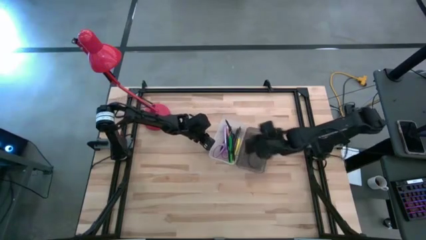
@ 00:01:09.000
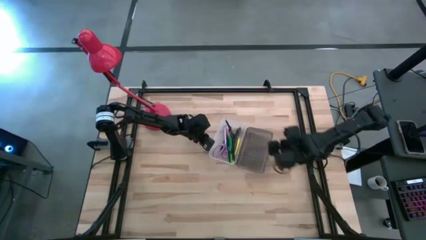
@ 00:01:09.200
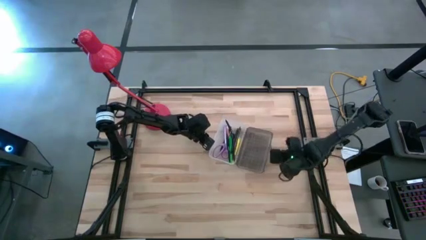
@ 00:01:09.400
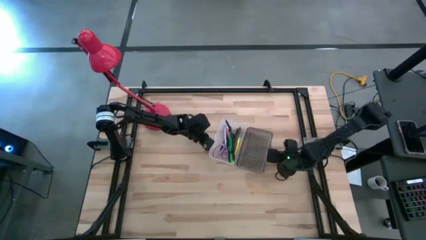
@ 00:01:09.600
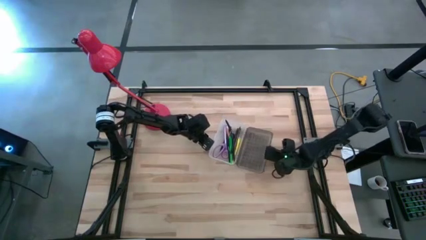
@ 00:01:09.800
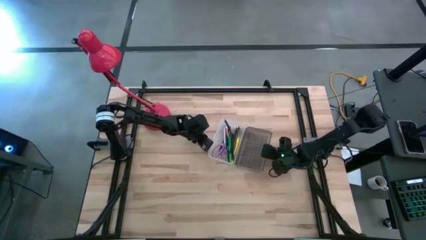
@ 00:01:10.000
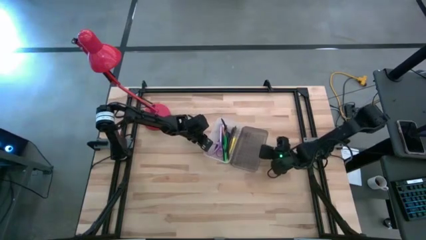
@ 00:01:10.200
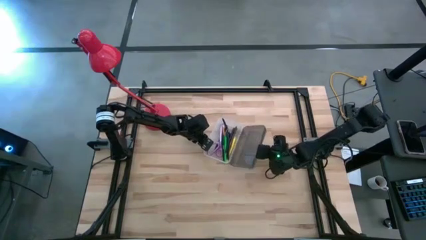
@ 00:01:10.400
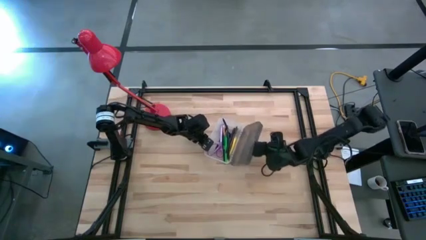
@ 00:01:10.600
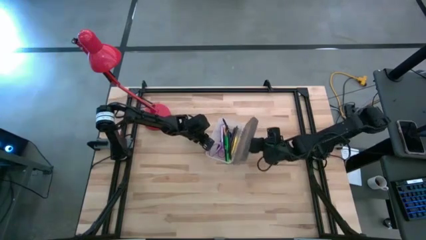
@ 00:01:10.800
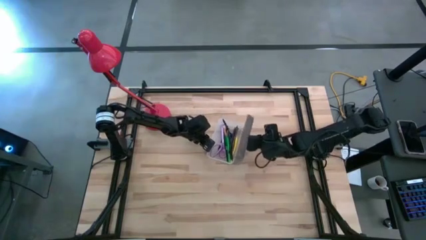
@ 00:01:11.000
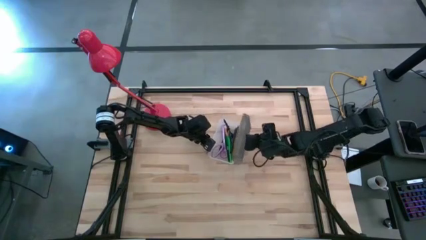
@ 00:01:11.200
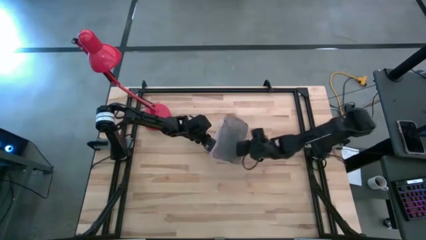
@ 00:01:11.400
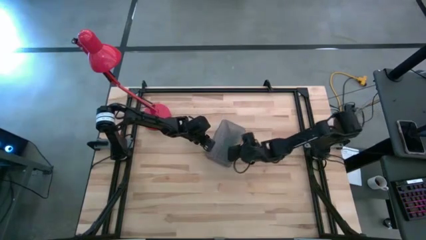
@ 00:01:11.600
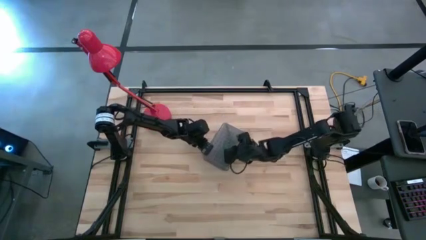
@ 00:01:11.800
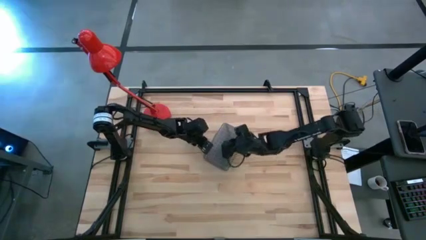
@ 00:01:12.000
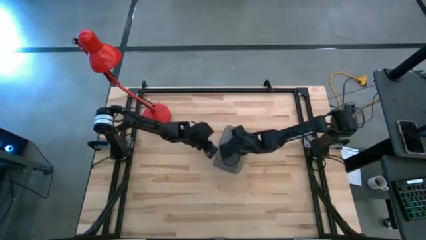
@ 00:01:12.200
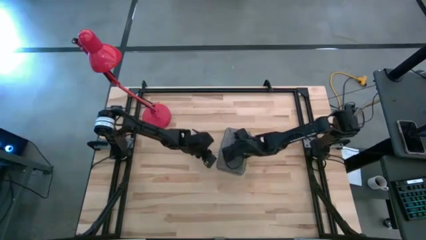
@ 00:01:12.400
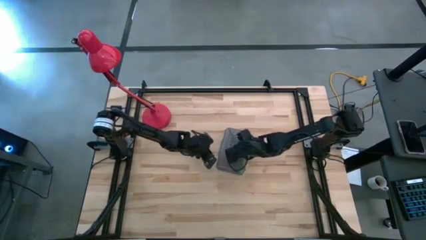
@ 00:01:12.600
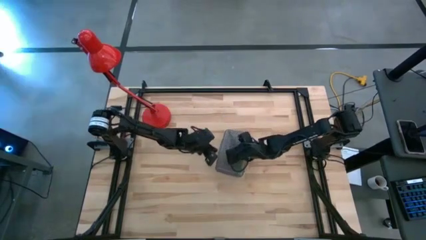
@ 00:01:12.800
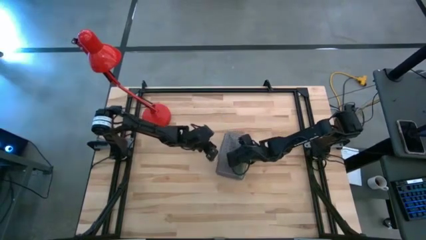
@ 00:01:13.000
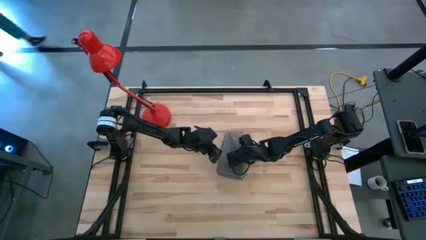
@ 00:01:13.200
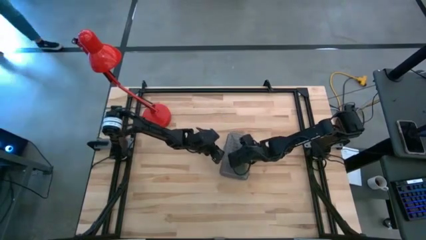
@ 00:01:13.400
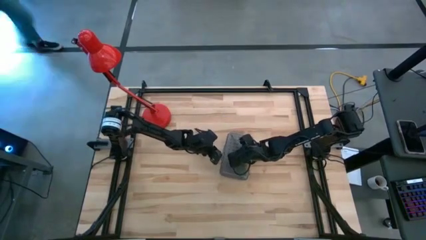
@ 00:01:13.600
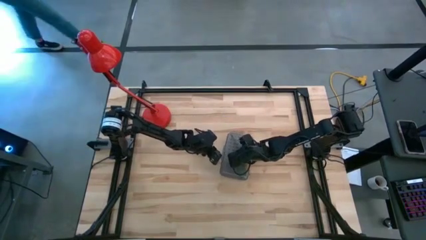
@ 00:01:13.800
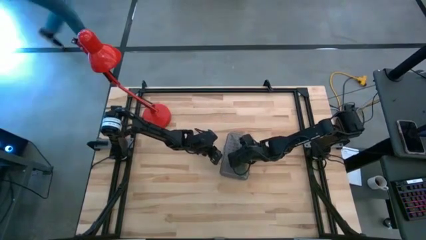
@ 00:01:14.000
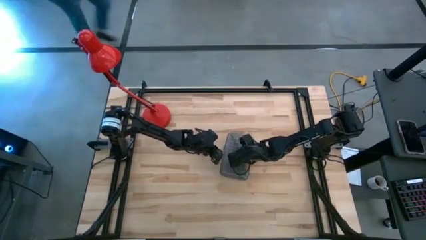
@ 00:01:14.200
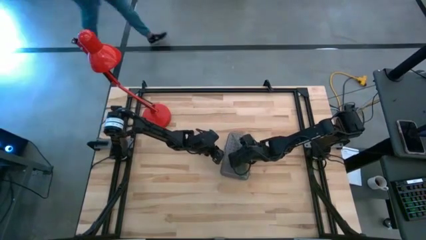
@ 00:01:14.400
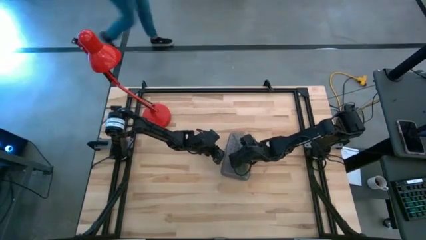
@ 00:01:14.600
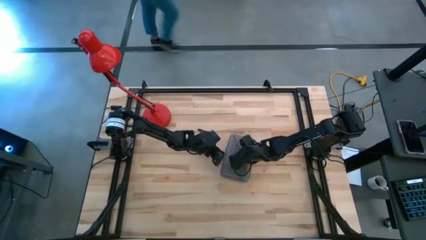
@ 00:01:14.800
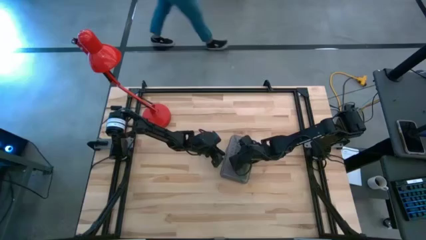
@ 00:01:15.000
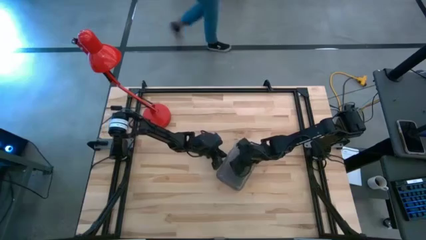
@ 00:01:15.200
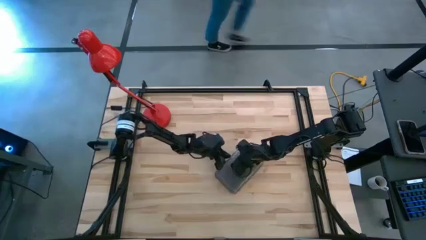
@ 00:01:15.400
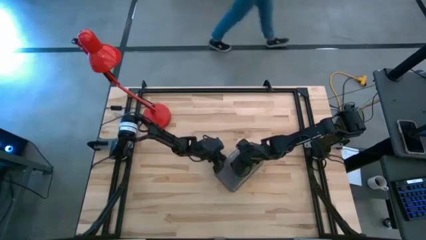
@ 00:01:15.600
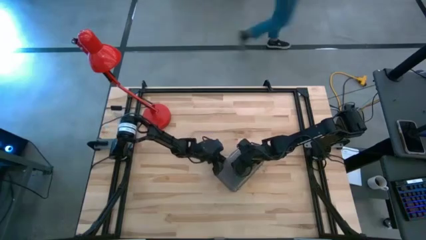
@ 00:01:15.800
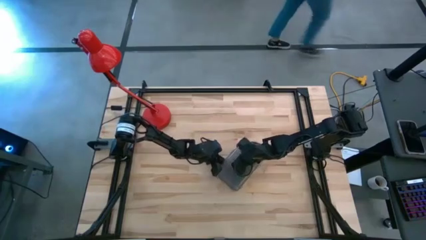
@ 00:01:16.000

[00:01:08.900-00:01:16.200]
Task: Pick & place school supplies into a supply box
Close the supply box

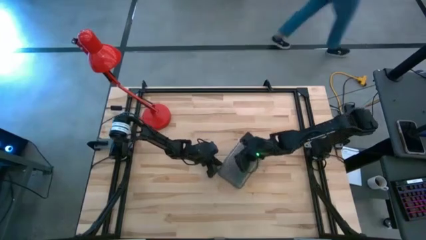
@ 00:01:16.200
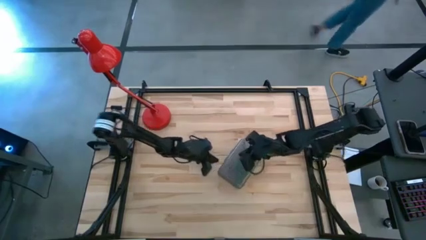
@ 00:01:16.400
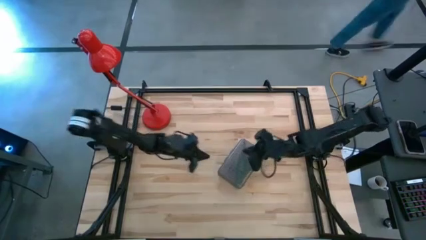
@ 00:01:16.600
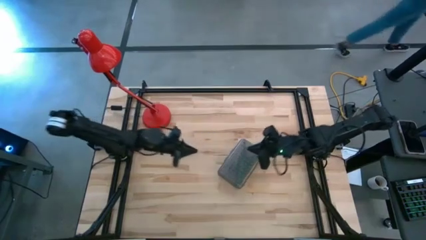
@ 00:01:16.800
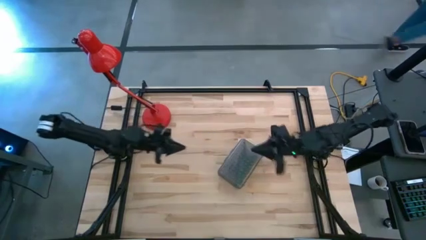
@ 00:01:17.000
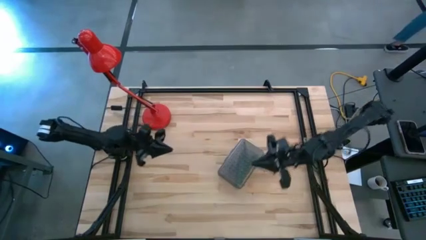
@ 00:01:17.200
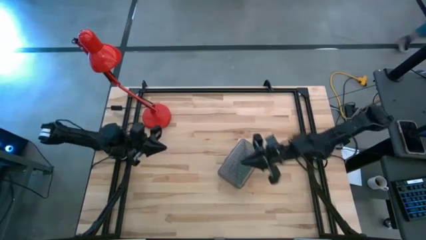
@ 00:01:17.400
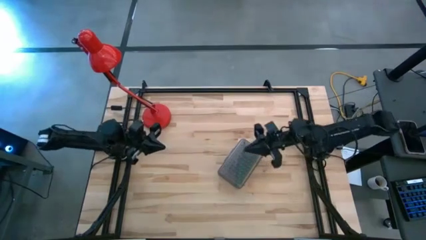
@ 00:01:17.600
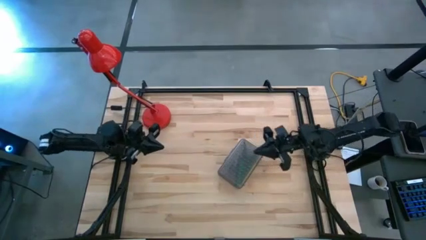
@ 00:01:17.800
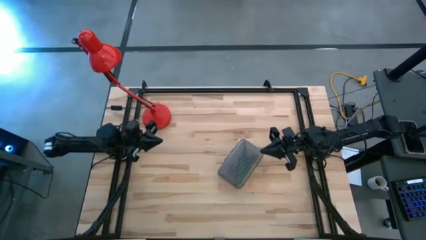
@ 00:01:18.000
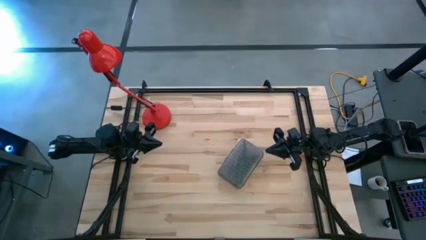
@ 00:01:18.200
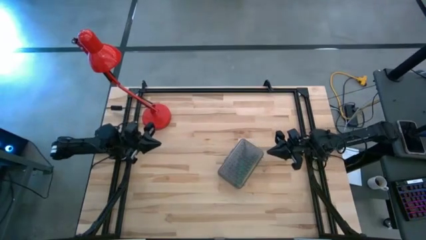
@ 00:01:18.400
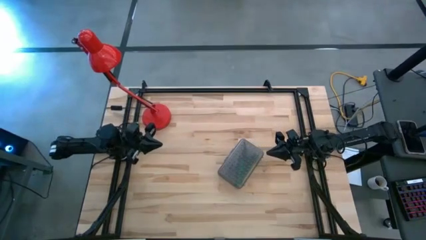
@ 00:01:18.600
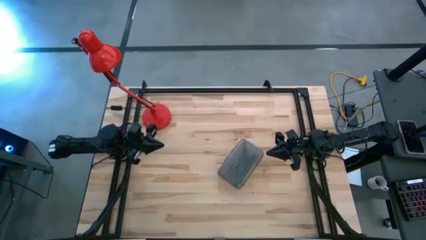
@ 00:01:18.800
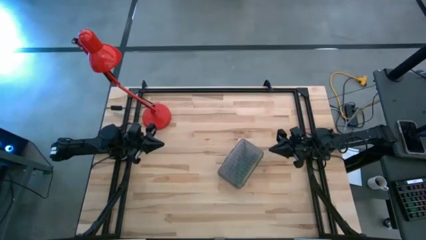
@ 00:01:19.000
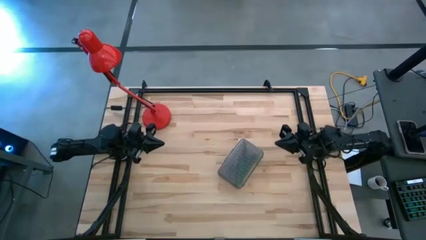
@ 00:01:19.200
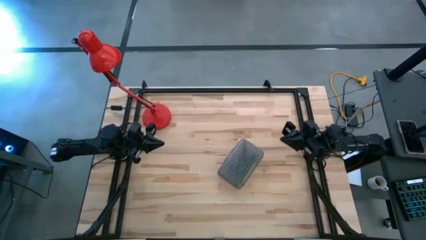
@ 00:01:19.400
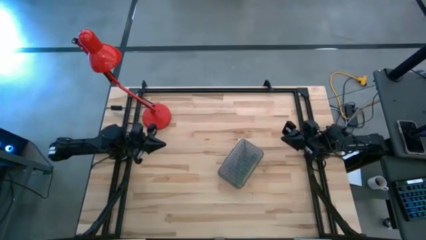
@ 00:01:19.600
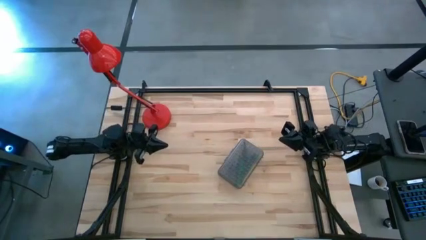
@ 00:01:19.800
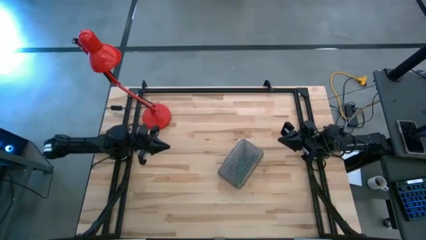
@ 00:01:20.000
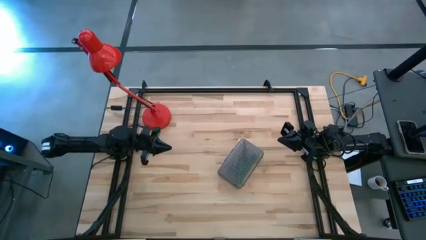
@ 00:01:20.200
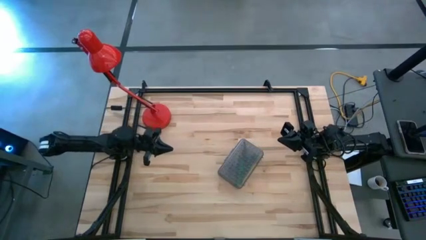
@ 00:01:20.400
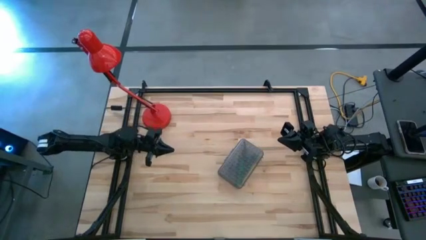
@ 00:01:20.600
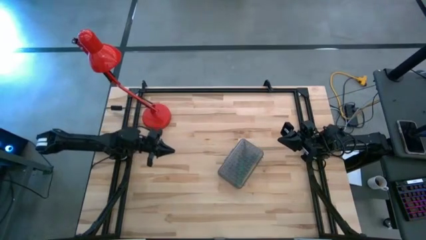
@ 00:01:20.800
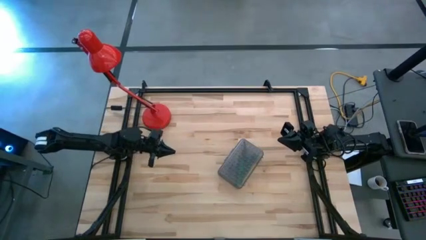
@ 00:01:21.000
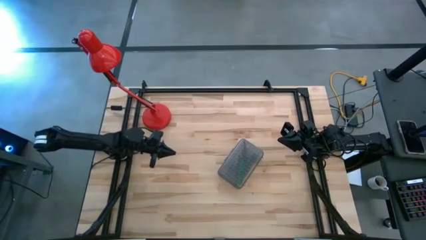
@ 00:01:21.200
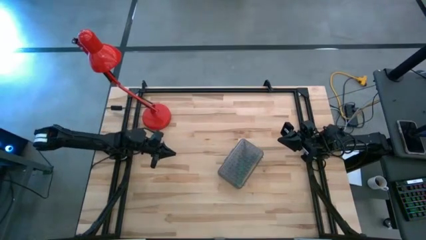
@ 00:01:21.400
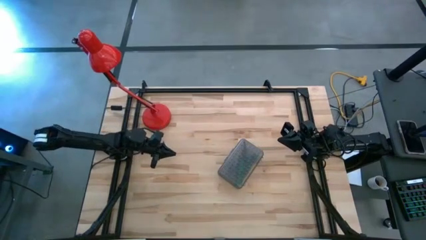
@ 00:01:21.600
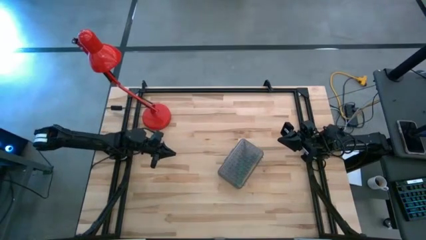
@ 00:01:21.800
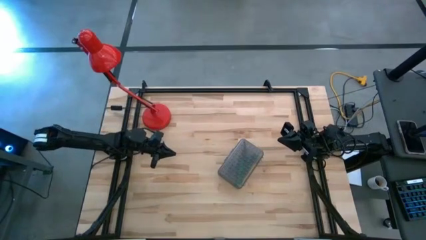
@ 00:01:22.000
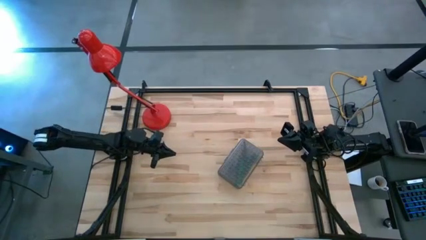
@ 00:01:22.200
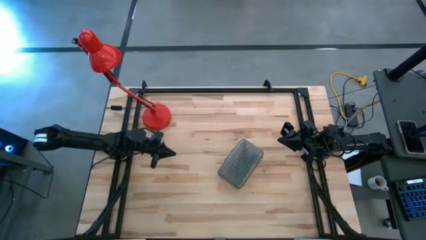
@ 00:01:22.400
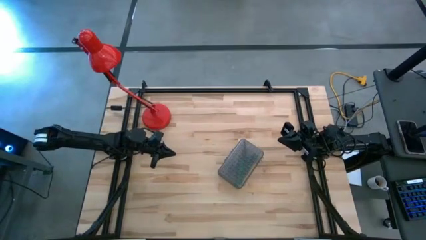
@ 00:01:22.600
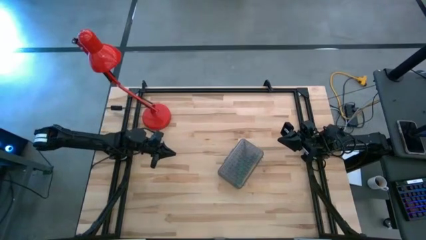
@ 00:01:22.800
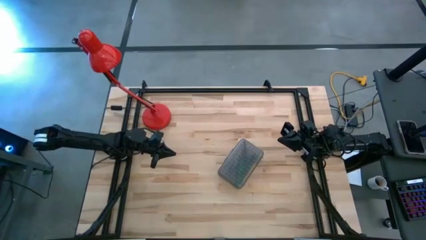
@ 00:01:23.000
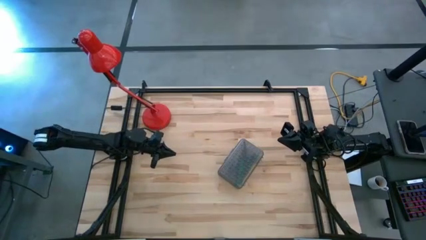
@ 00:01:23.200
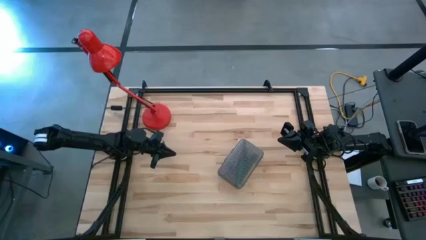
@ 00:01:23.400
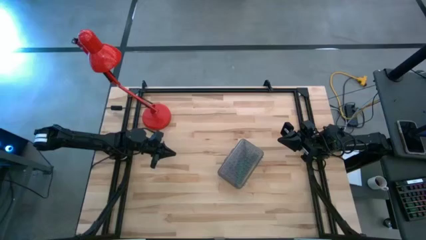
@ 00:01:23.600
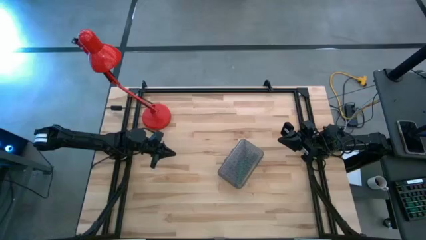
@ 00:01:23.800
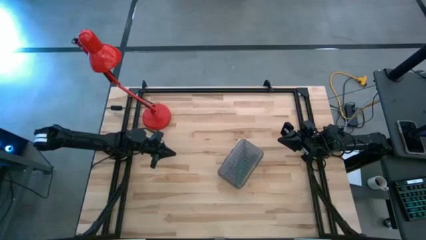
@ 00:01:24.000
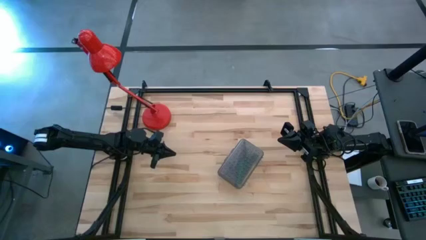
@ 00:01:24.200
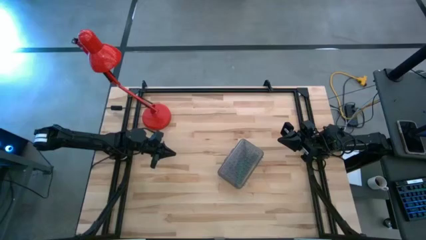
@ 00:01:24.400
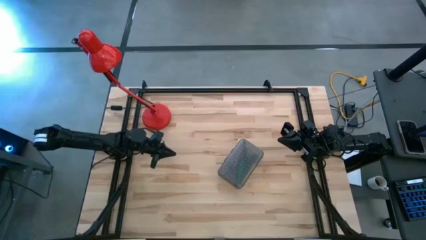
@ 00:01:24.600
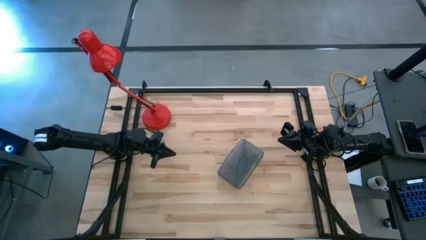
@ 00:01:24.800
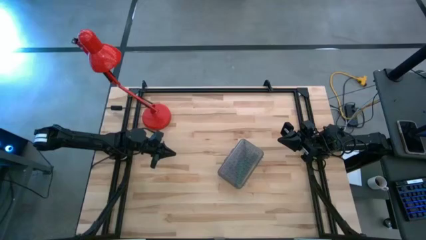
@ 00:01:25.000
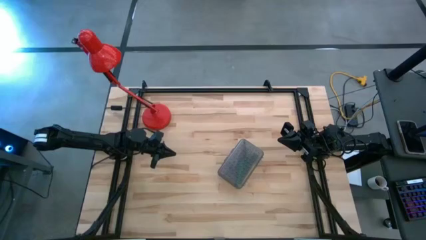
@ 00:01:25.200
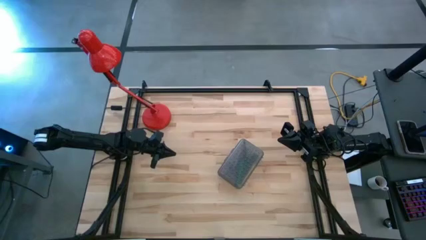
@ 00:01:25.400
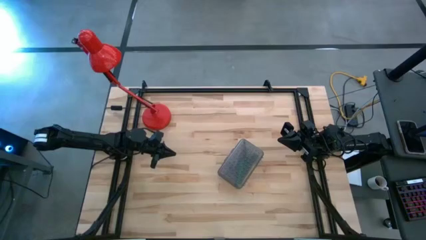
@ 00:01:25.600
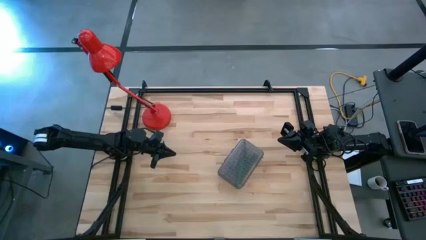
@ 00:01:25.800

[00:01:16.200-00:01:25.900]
Return to Home Position
